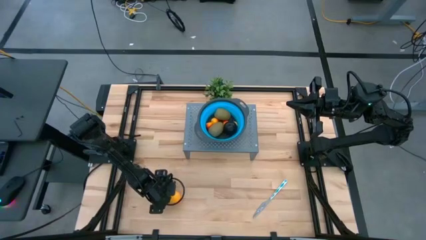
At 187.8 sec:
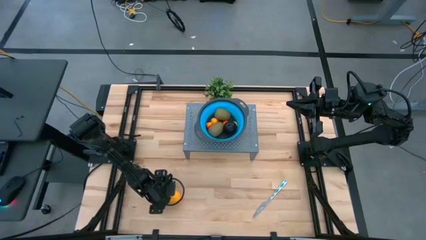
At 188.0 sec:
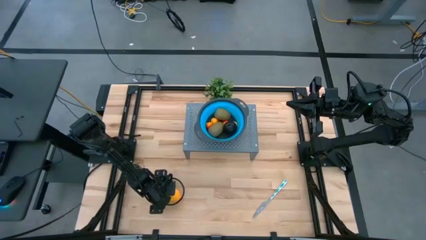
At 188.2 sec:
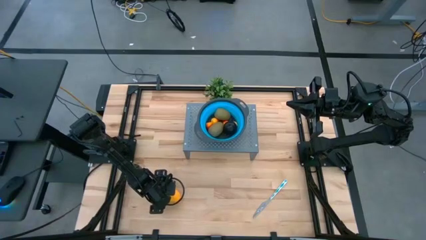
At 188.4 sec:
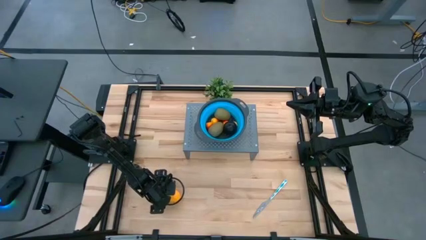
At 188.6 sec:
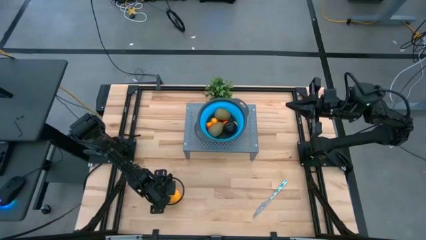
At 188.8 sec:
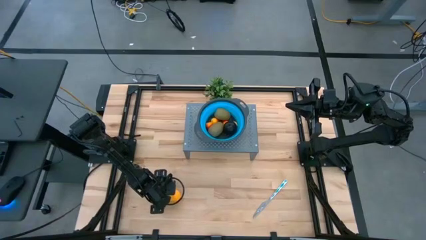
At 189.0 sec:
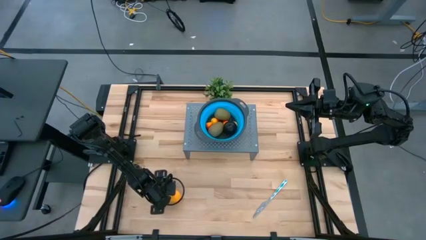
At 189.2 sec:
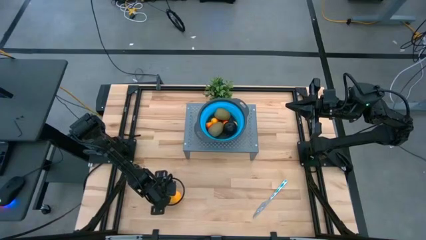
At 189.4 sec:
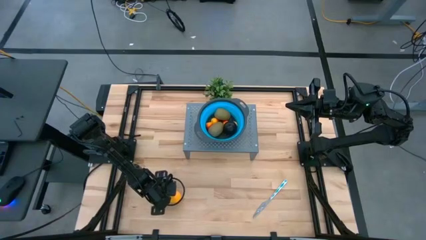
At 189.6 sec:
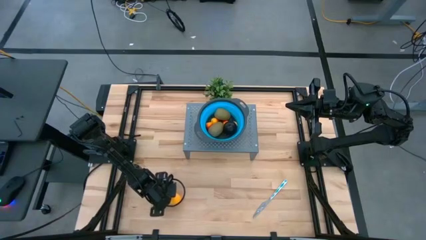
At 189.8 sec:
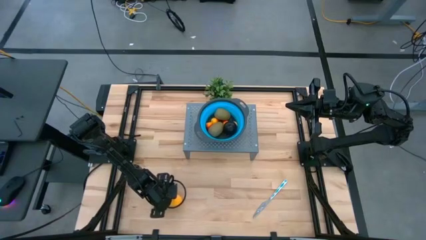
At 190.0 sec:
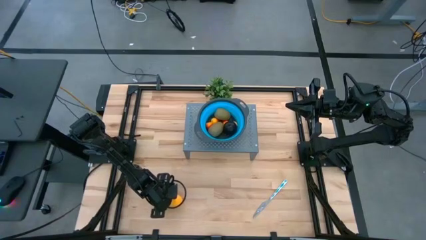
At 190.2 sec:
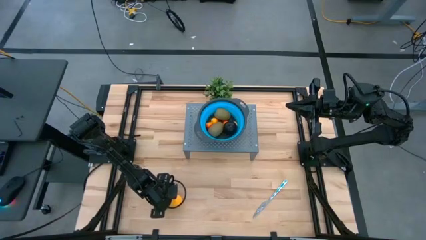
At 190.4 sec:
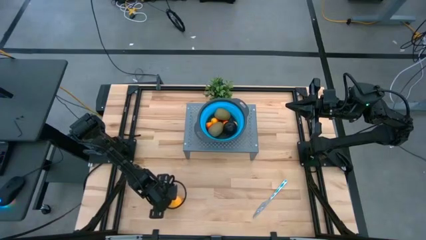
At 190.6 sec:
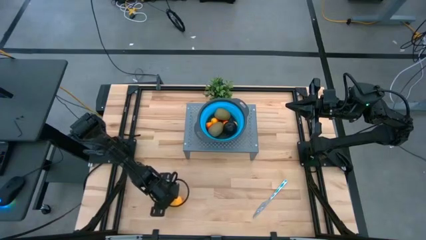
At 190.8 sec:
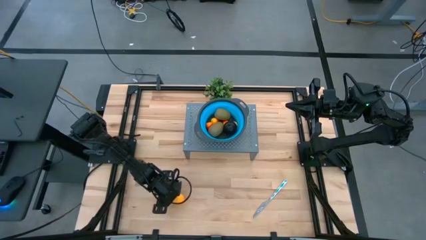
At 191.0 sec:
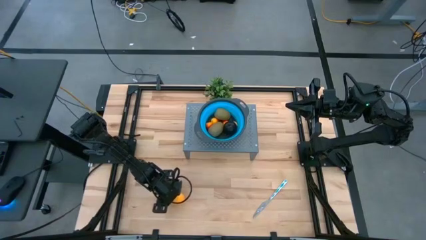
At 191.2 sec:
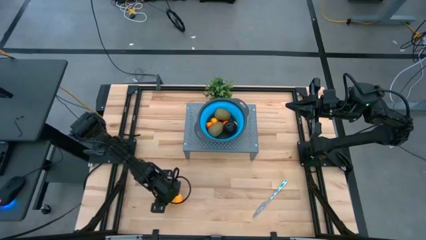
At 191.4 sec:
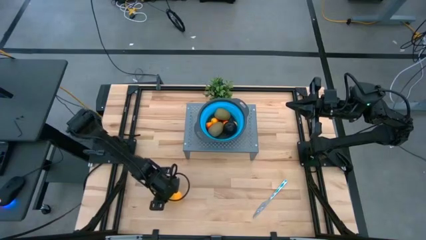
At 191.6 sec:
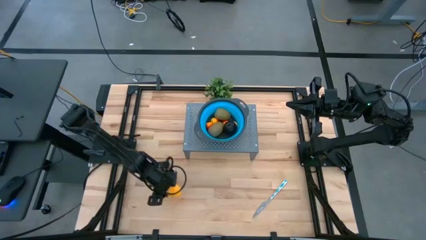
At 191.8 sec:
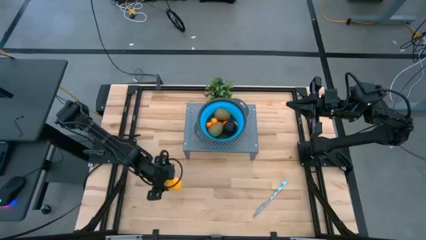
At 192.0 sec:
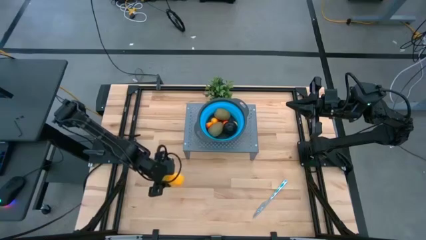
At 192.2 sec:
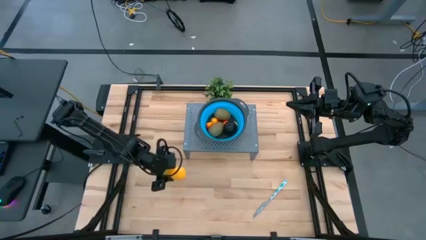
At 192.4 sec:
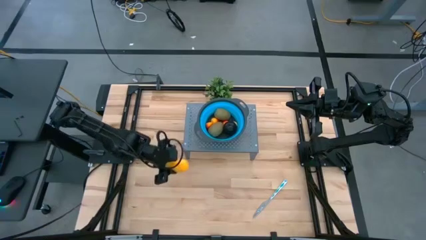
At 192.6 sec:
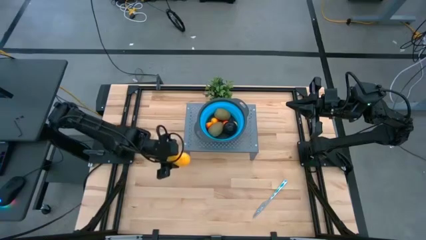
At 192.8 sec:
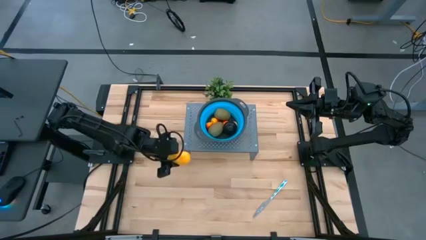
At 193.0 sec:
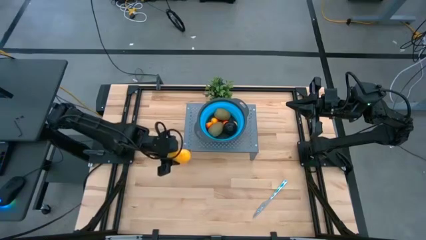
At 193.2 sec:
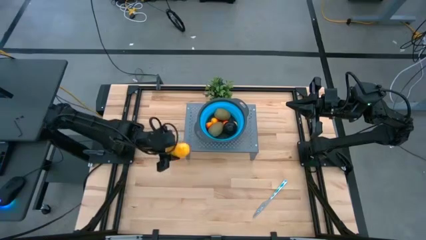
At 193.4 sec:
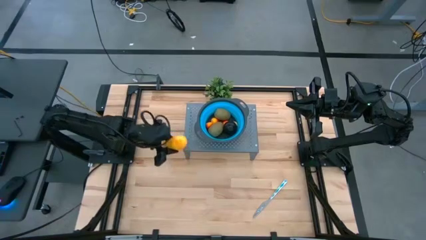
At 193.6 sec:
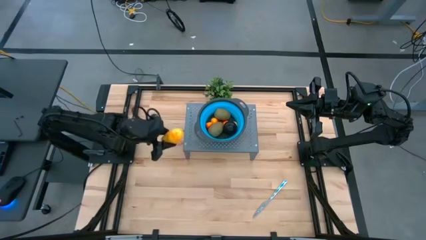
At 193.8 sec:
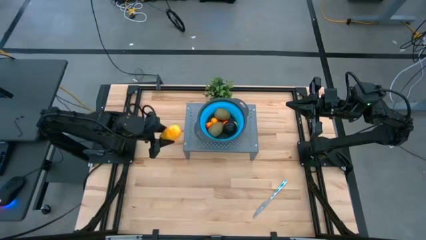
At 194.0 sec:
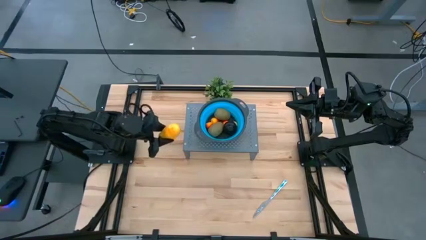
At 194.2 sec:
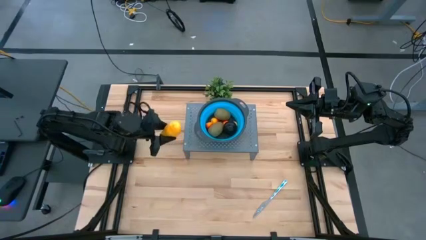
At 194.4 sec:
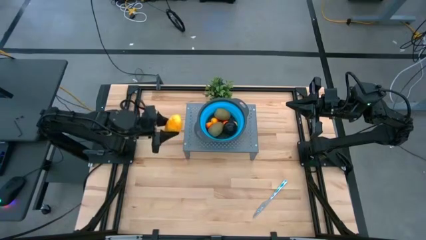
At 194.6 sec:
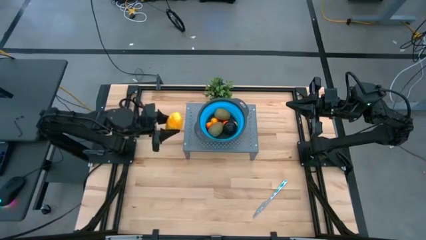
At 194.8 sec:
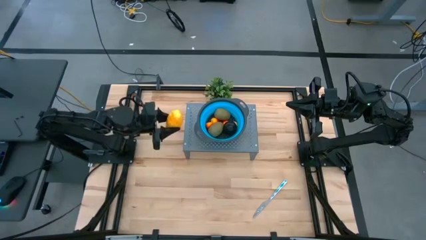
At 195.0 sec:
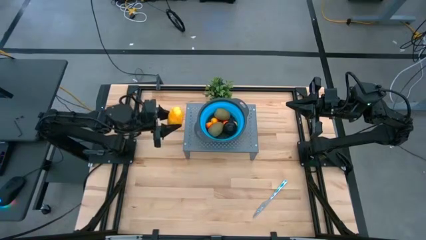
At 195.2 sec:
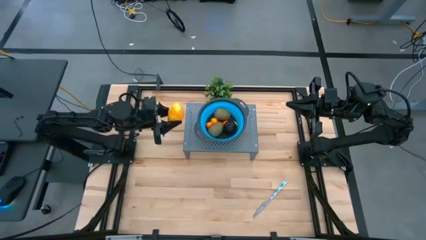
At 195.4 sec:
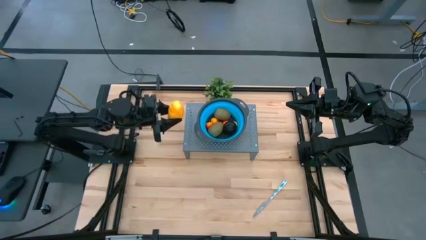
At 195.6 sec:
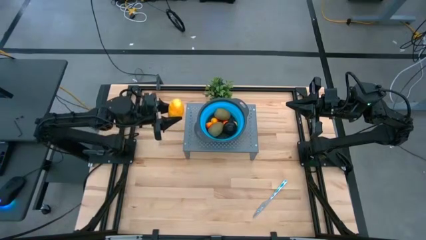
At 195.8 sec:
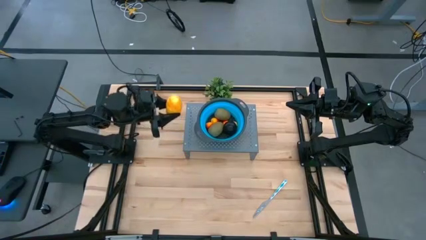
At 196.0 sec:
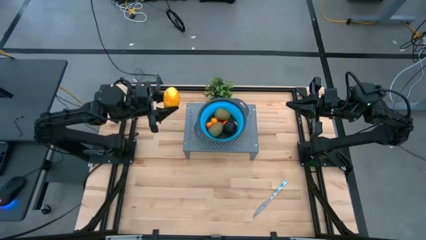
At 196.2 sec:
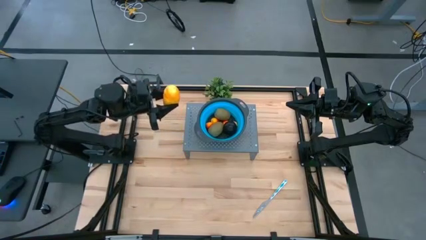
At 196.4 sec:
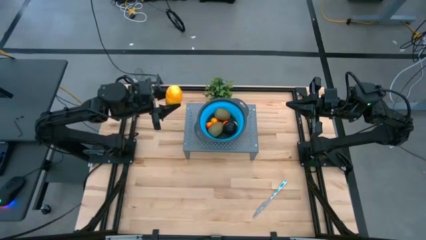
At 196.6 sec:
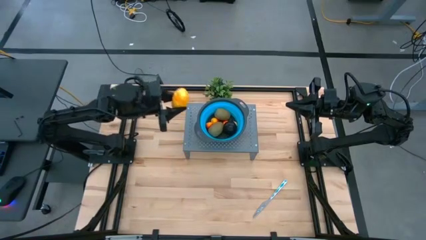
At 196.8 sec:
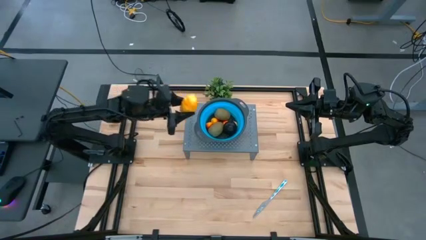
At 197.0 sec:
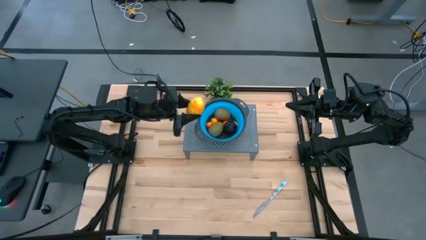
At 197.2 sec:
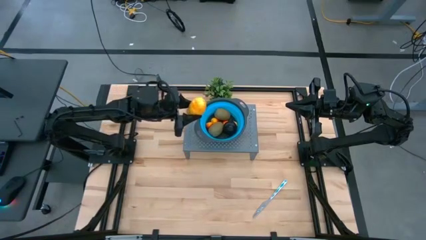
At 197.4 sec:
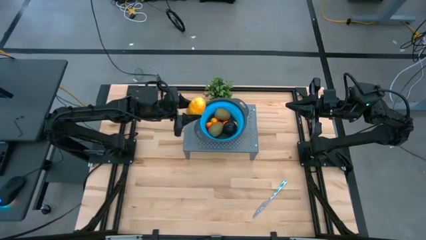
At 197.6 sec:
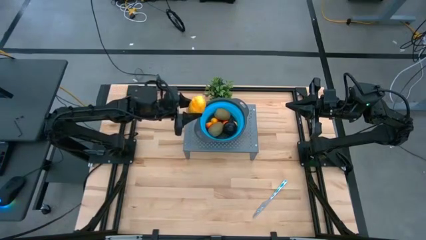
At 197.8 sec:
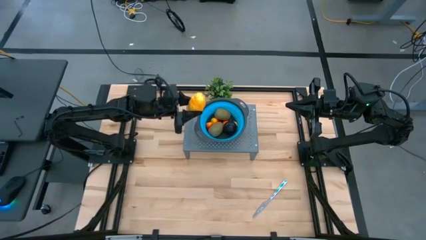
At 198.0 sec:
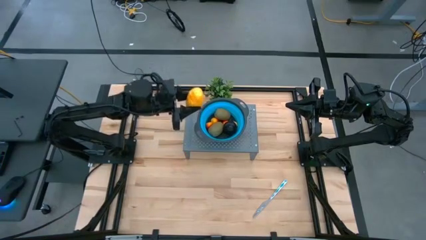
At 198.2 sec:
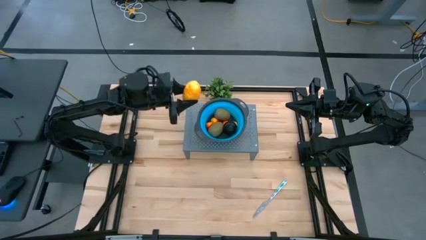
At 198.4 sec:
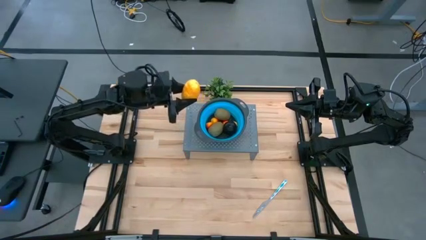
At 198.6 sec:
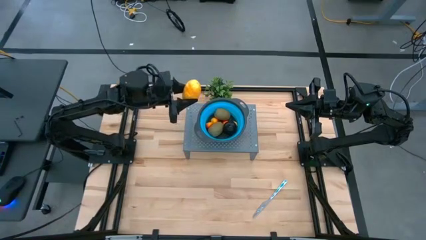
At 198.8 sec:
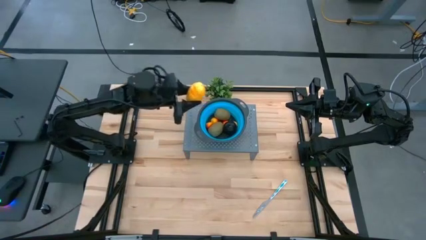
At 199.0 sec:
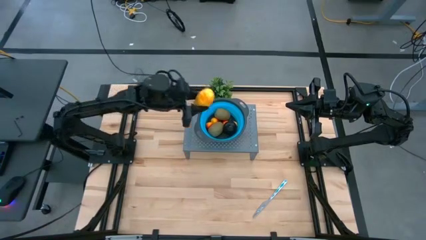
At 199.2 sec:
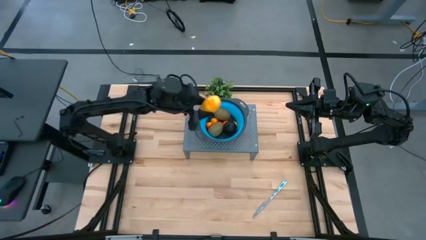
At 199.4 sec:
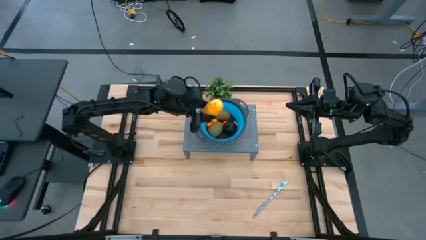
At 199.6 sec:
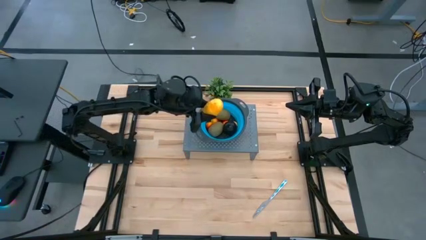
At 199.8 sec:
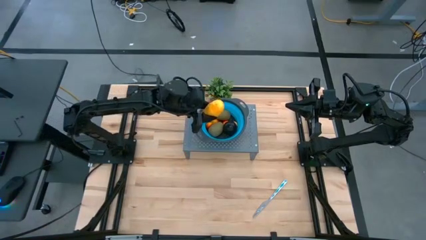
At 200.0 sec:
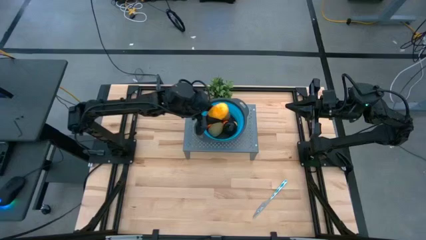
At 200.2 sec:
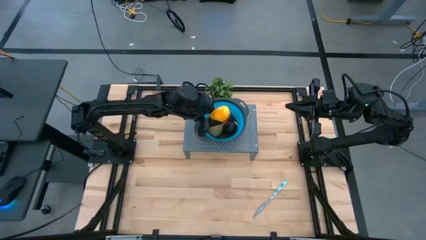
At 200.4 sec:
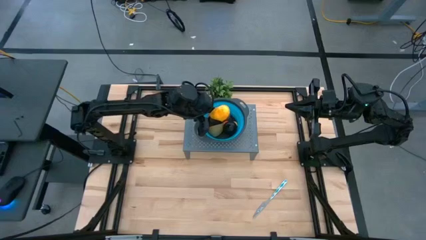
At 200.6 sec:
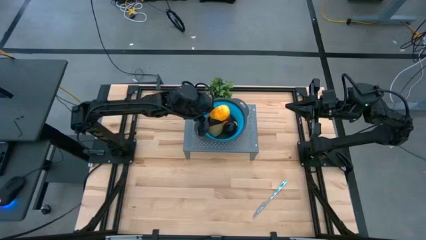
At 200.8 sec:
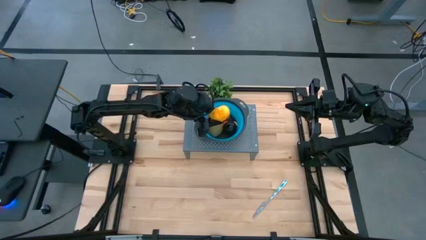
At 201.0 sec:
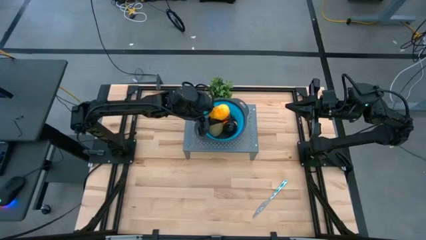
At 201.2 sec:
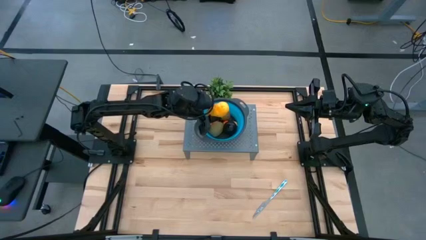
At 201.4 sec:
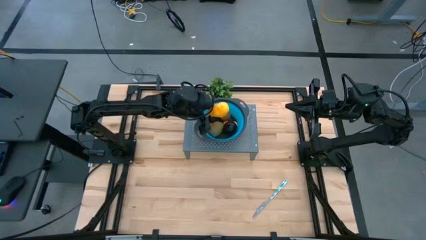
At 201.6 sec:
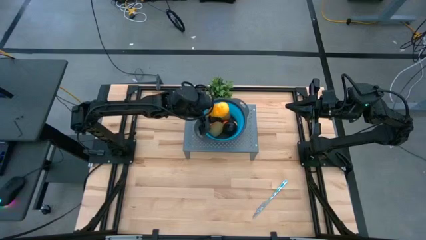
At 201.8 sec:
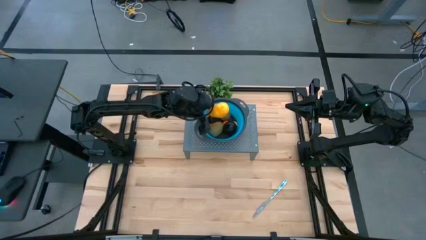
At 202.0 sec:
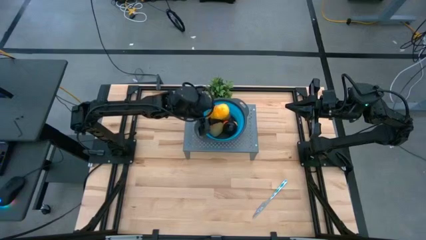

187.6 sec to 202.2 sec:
Task: Pick & Place Fruit
Put the mango into the strainer bowl on the shelf

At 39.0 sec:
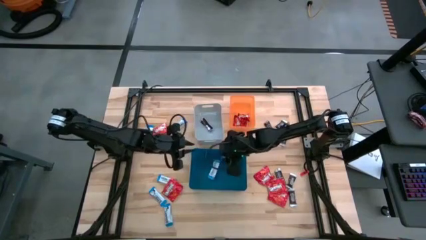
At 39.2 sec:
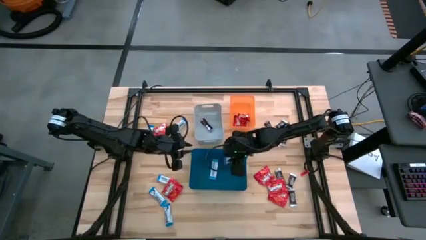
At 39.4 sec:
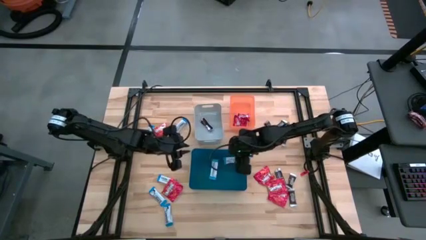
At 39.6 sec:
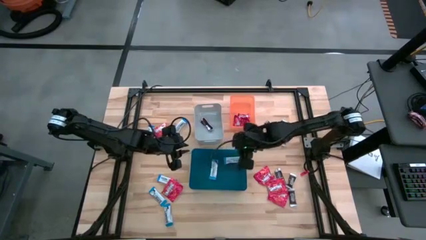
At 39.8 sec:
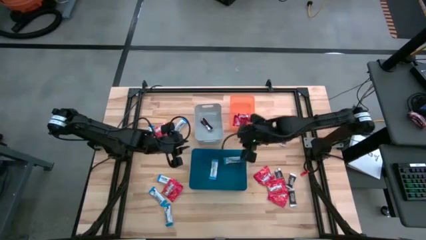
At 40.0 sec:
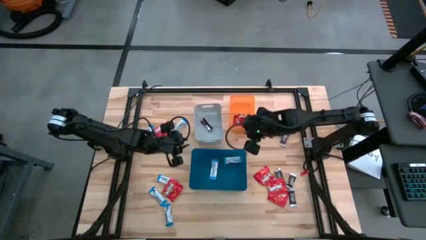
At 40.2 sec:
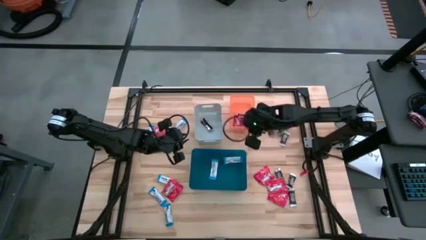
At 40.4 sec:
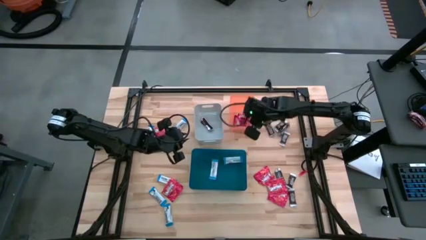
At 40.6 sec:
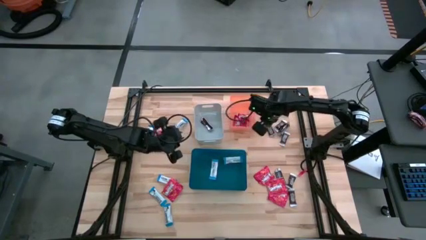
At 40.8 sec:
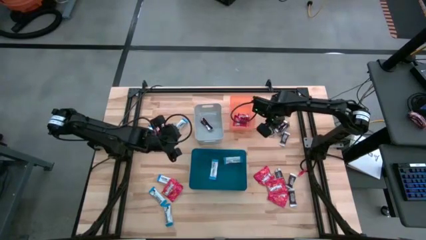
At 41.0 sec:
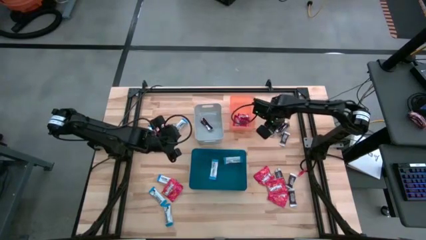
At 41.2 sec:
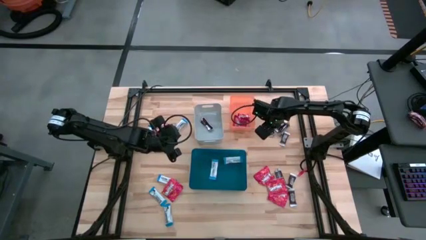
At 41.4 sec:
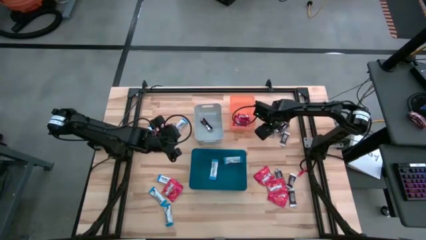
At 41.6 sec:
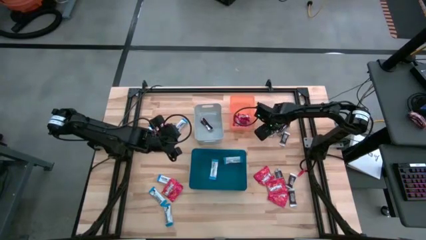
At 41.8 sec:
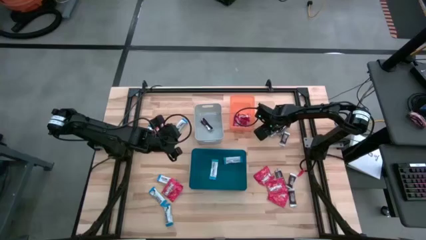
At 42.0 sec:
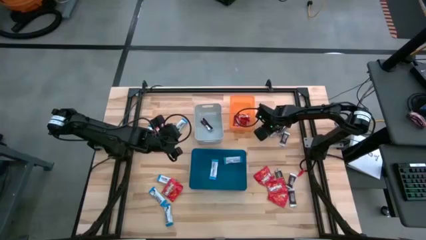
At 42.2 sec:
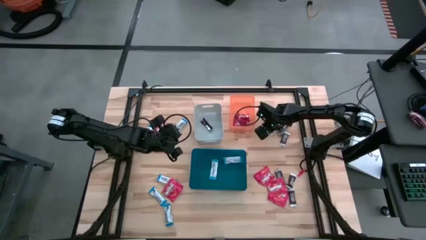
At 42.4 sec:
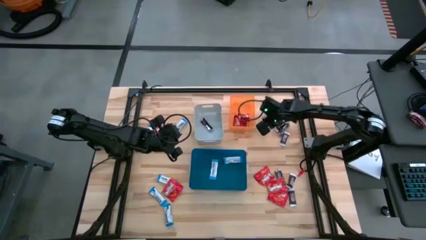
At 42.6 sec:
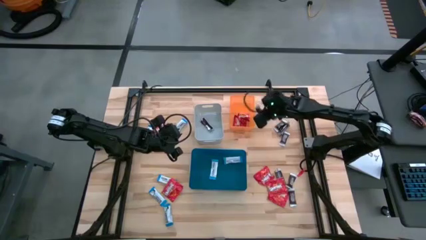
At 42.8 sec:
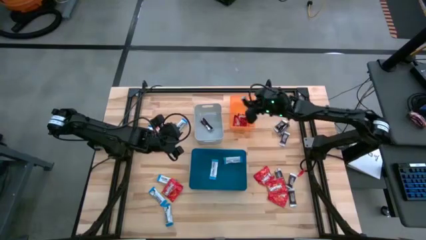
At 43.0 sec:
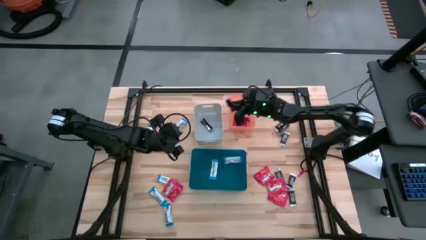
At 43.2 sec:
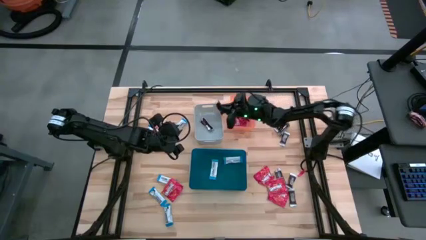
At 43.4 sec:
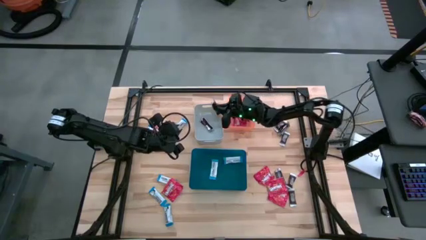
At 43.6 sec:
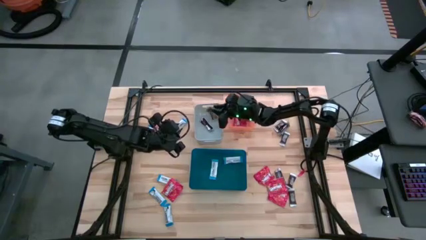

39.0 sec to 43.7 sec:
Task: Sort candy
Put the brown chocolate bar into the gray bin
